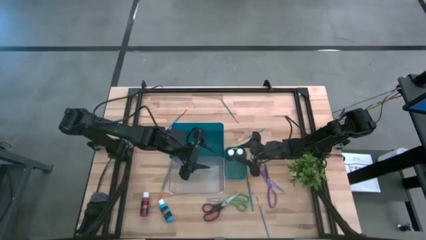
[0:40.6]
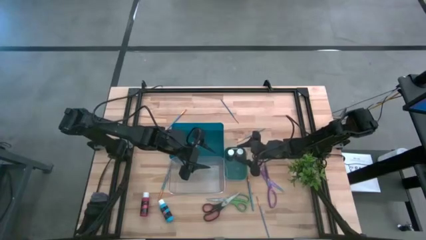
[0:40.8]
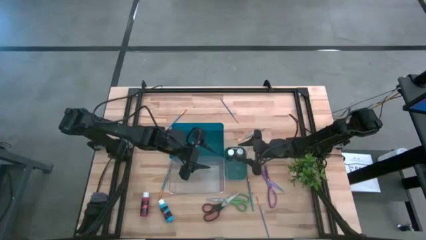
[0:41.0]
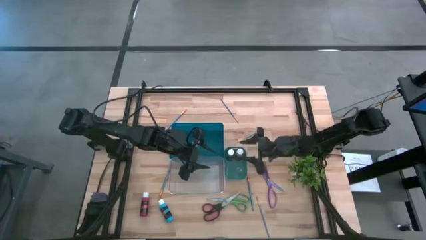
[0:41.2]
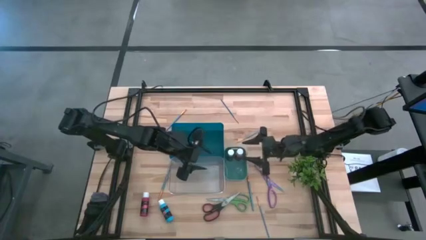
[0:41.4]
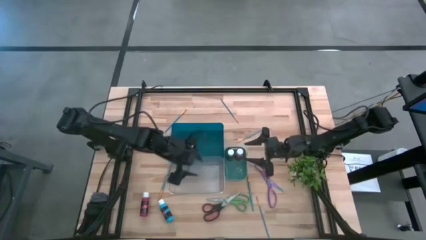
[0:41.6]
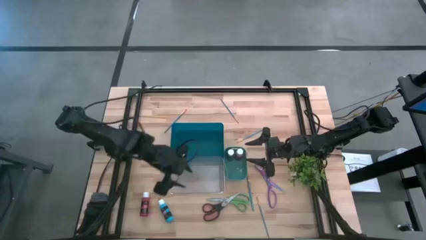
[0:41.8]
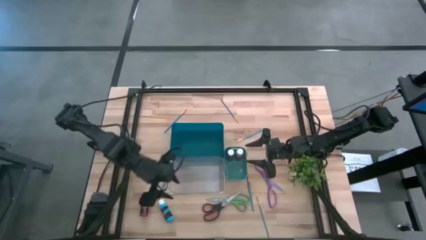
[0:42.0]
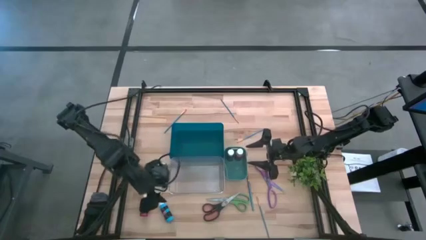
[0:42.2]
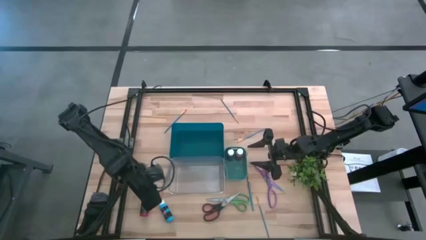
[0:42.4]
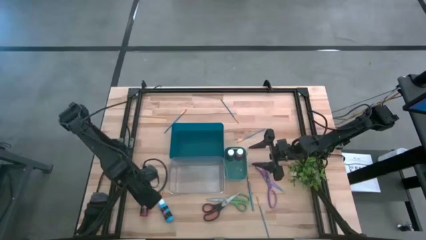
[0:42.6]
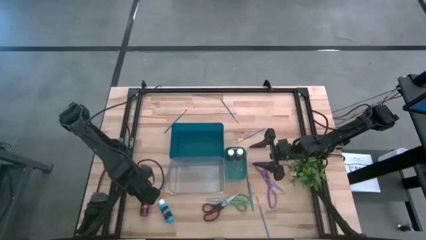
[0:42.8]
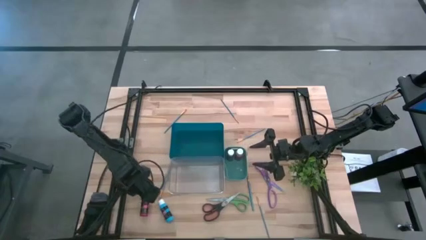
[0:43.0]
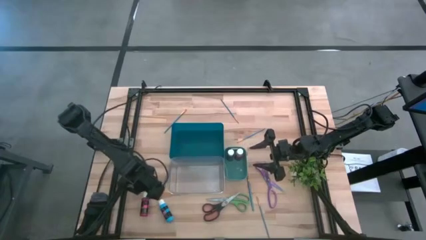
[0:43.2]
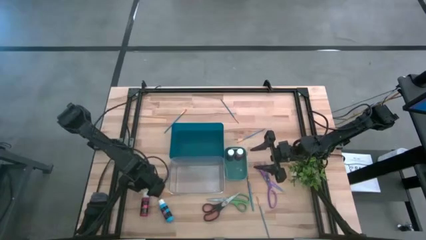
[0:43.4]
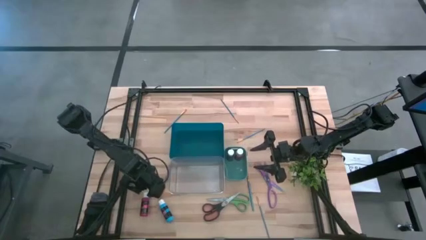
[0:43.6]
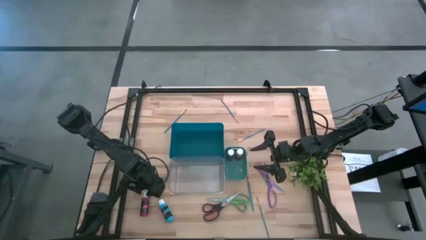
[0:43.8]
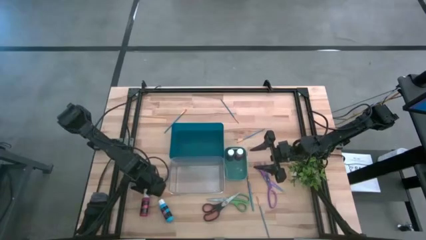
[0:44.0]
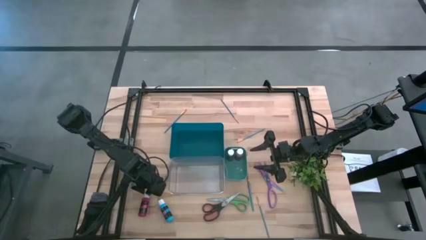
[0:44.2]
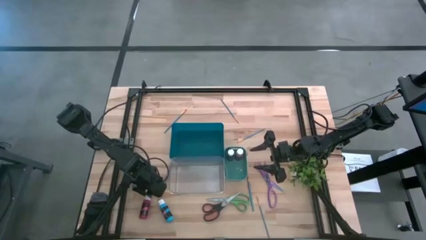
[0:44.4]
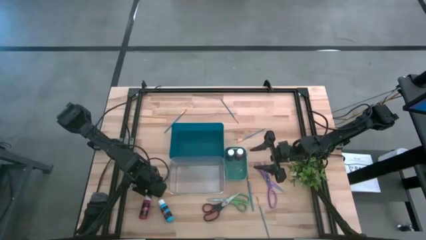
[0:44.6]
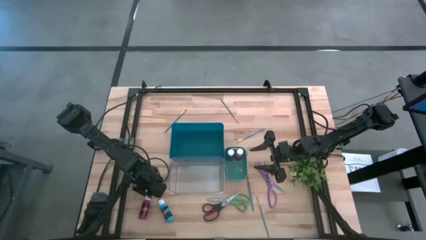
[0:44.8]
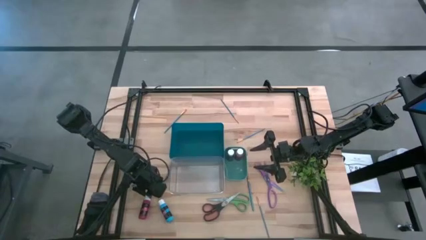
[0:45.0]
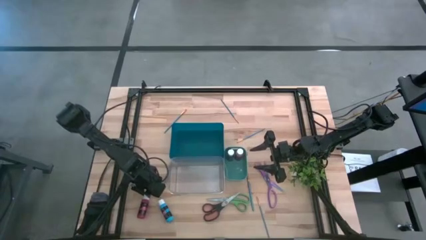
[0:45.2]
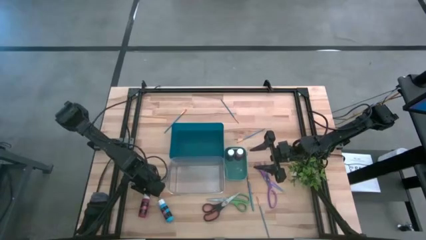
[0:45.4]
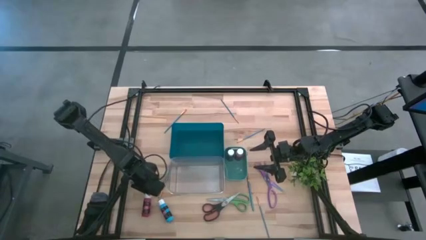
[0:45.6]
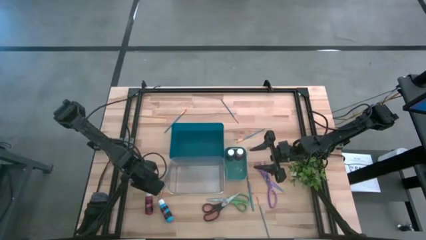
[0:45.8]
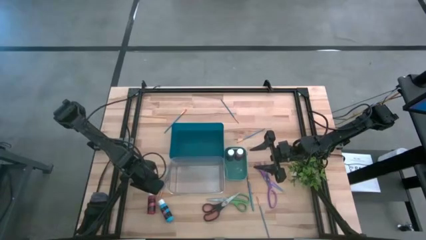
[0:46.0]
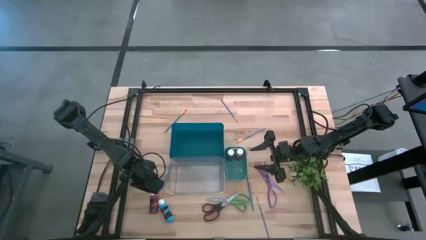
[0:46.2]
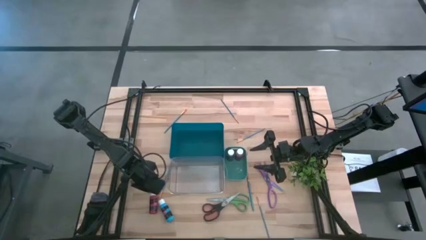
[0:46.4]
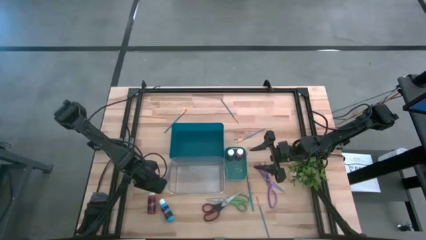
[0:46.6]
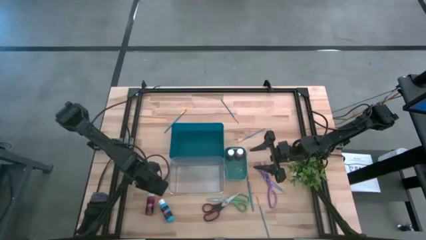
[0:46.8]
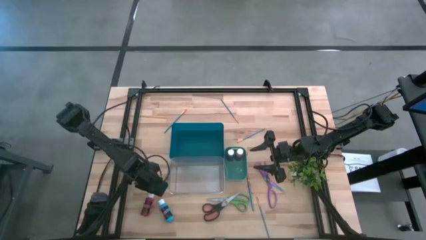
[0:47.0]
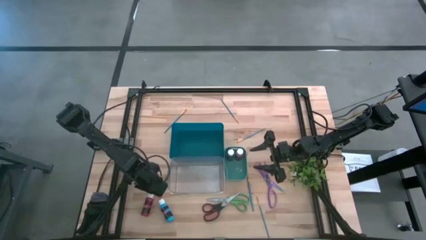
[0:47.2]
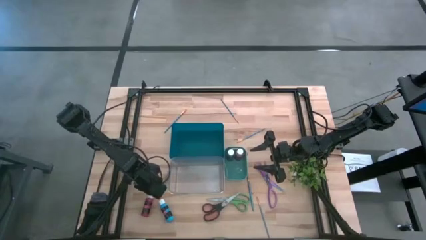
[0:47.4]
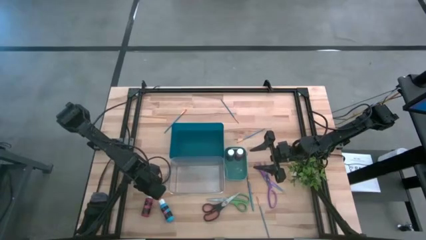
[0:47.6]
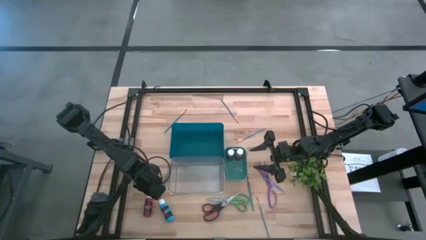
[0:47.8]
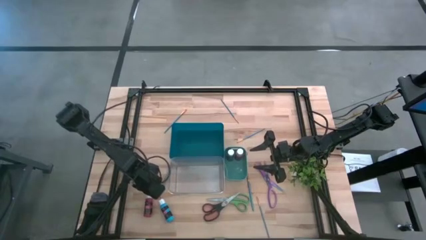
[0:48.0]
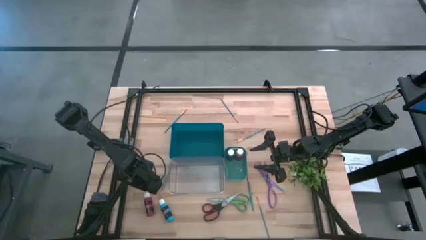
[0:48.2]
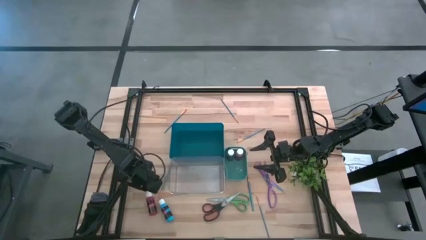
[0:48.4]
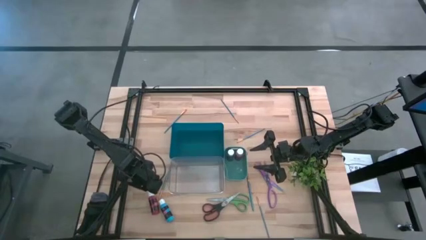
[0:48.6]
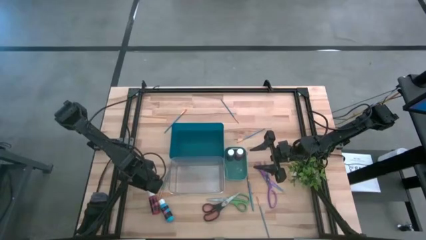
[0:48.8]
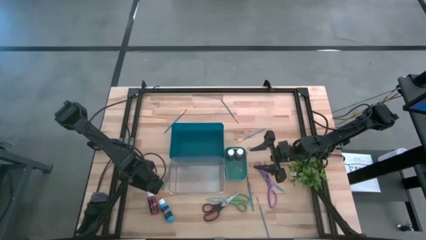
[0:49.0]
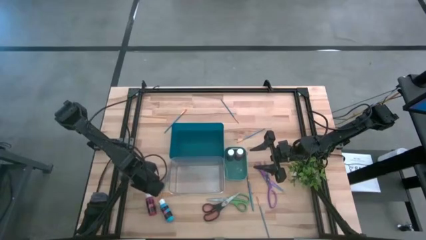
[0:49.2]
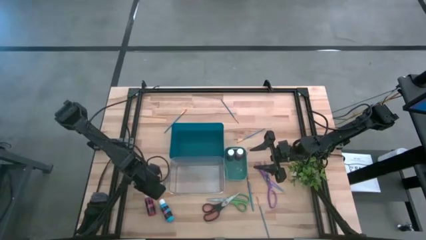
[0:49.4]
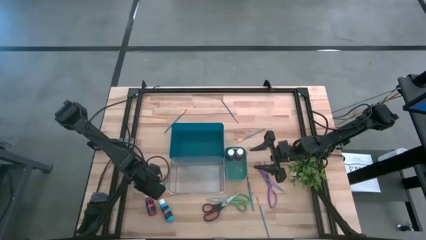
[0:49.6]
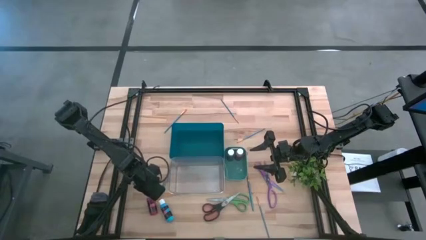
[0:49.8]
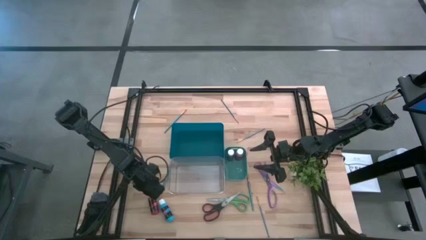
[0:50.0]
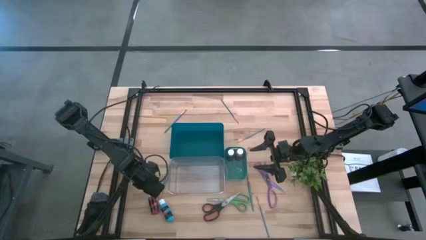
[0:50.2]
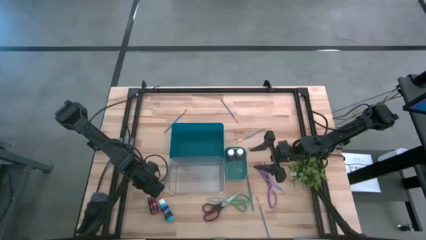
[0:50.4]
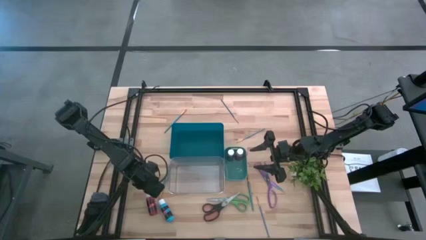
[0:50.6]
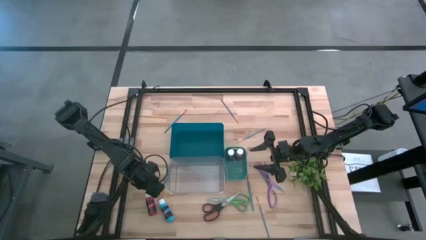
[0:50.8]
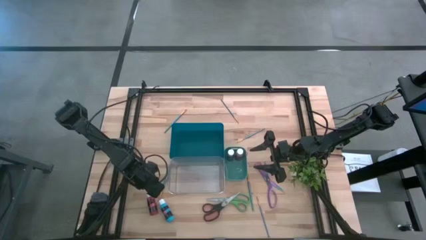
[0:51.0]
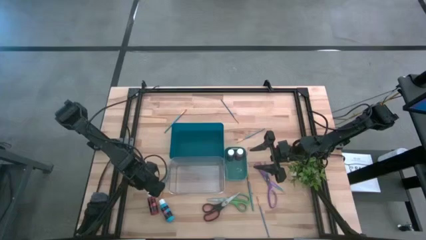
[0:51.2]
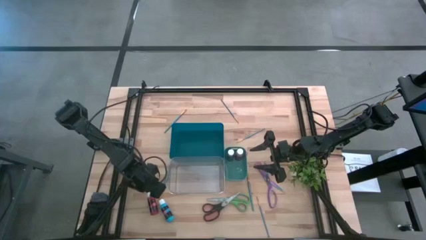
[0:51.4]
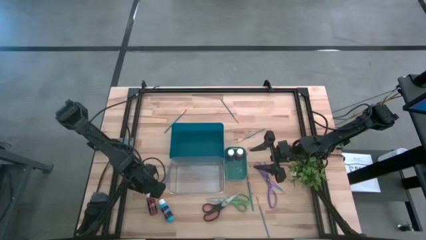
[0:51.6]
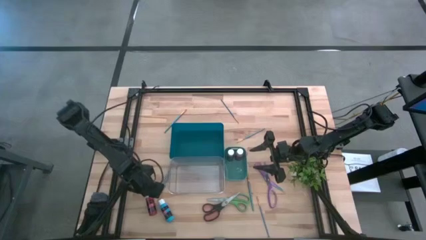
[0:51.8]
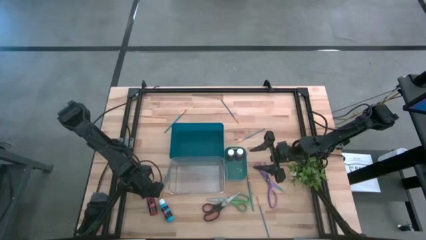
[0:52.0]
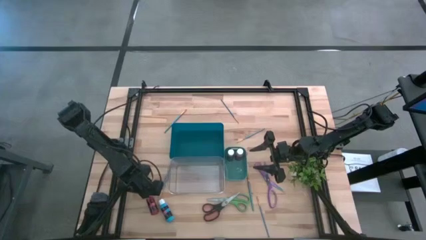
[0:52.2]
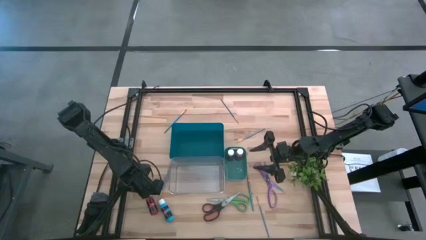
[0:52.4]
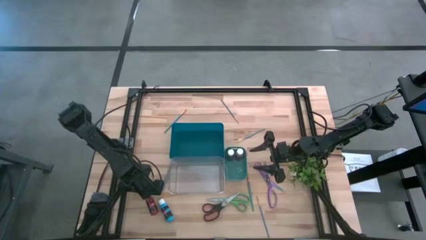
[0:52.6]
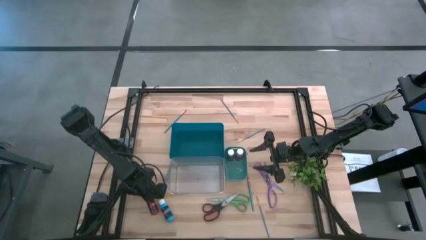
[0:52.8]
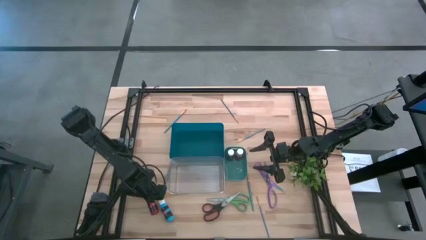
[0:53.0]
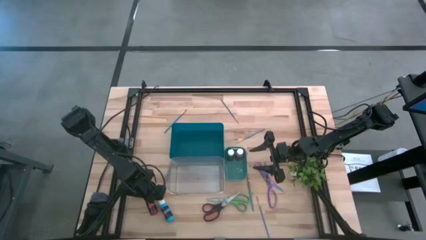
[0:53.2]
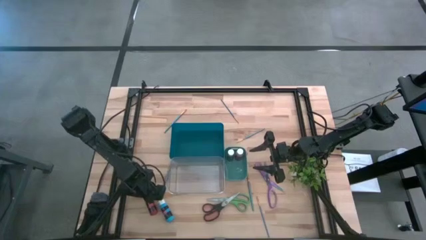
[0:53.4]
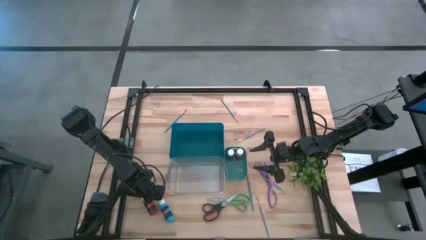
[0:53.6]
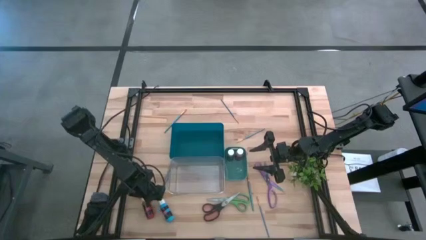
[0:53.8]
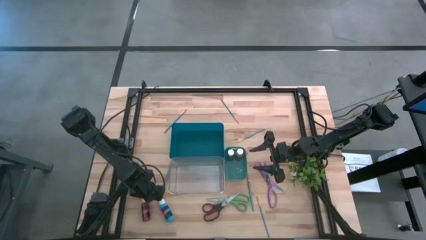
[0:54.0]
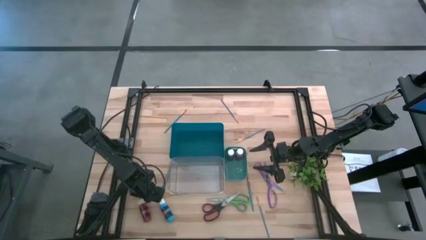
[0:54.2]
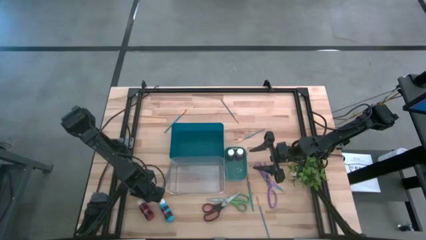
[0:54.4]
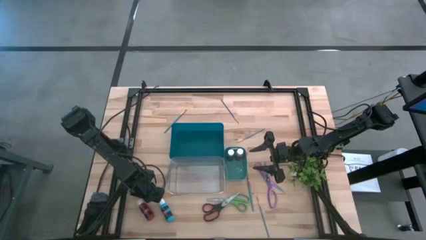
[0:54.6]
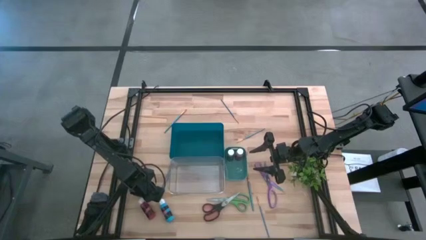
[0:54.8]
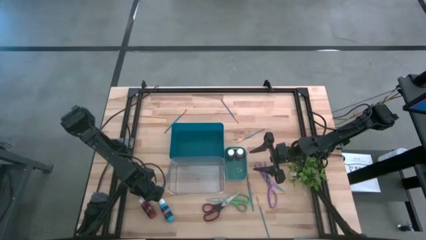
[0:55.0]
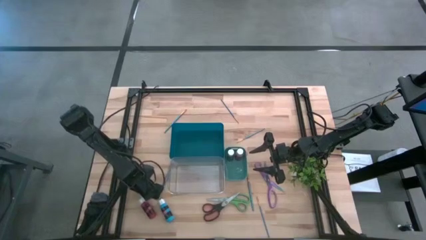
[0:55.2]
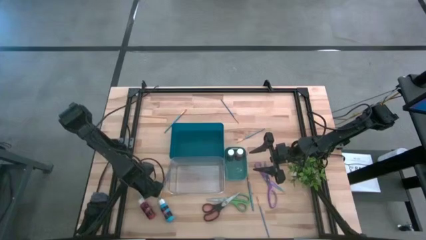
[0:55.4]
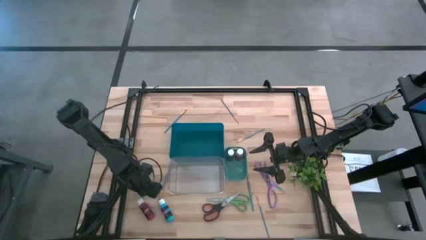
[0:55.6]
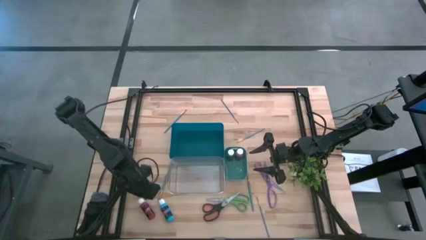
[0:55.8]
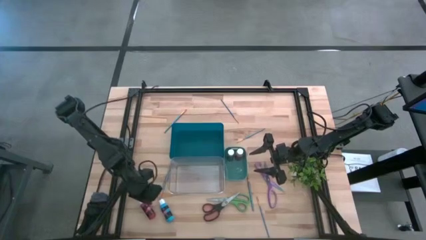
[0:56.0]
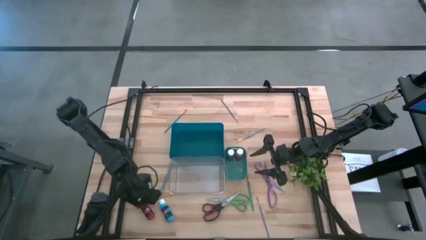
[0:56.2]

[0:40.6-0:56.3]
Task: Pick & Place Paint Supplies
Put the red paint bottle into the green bin
